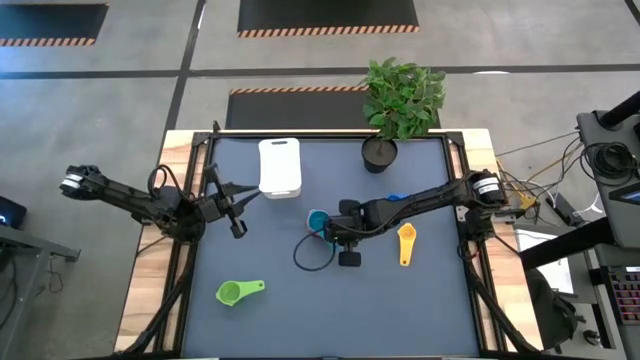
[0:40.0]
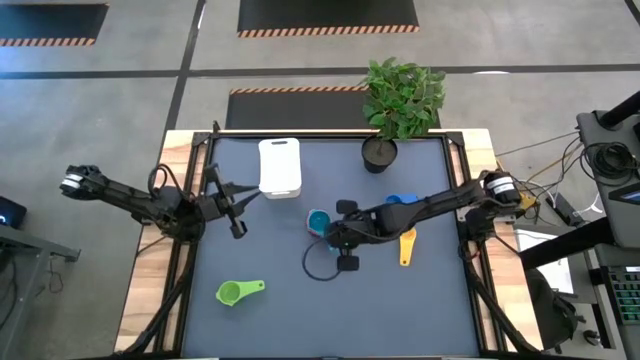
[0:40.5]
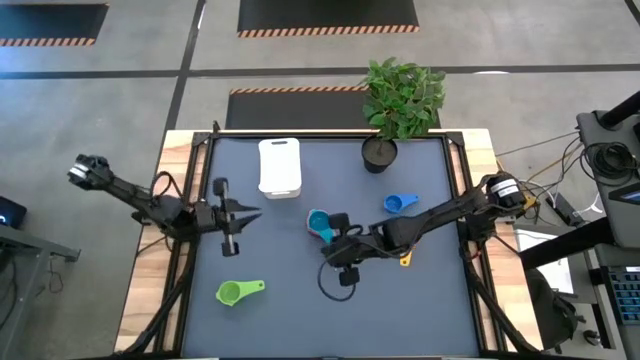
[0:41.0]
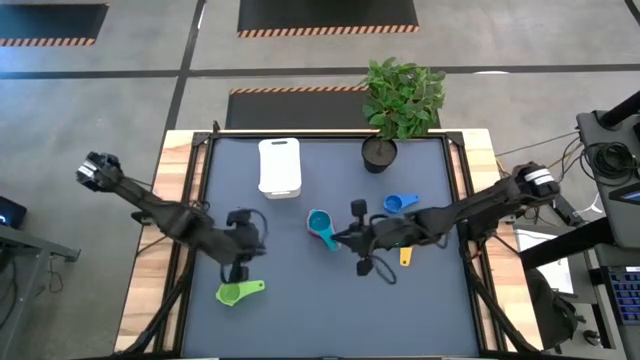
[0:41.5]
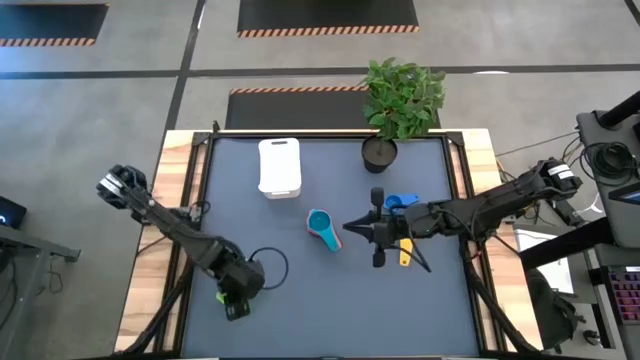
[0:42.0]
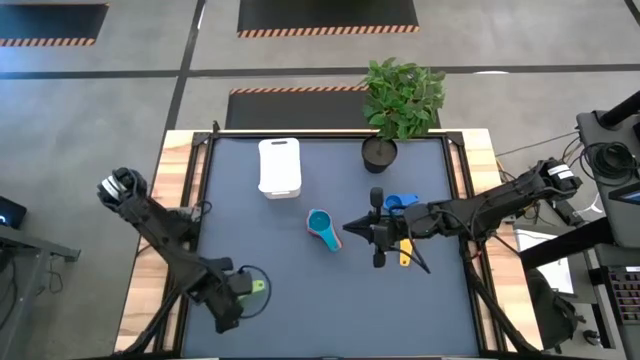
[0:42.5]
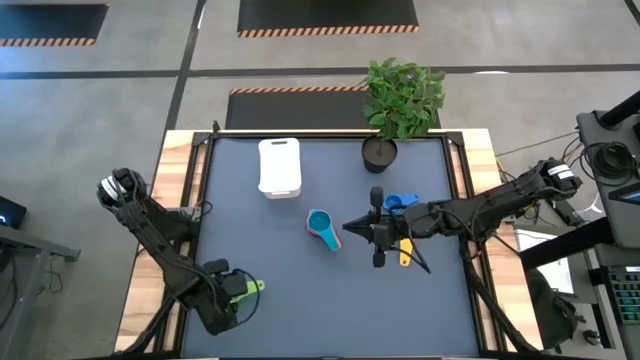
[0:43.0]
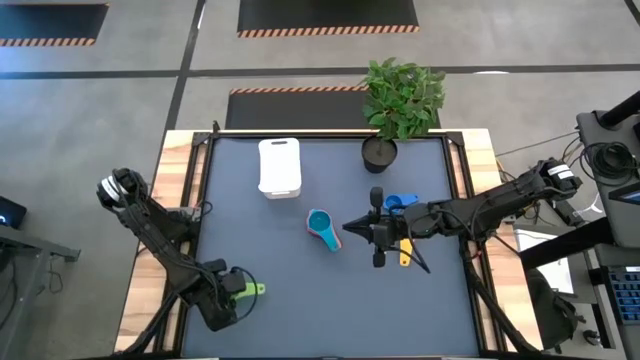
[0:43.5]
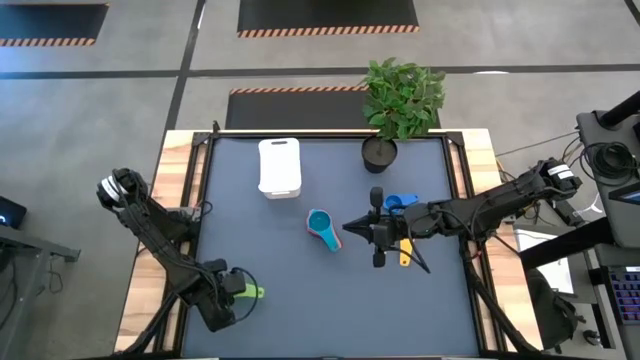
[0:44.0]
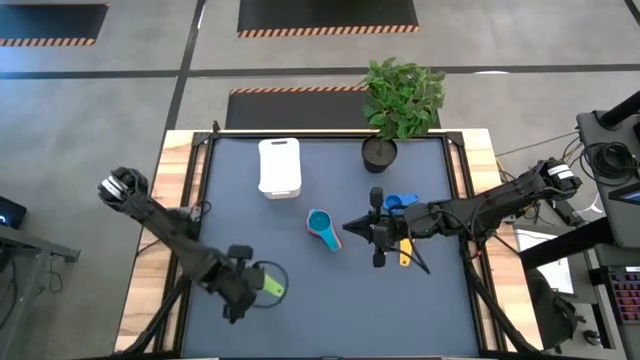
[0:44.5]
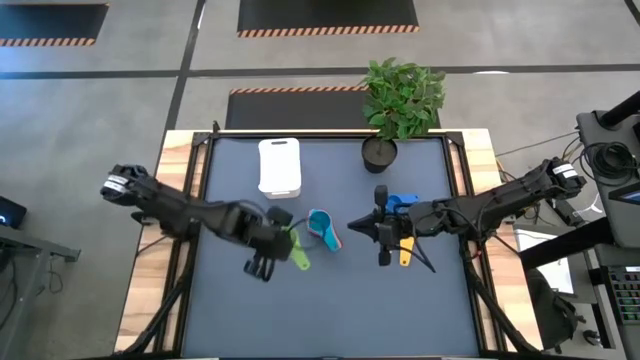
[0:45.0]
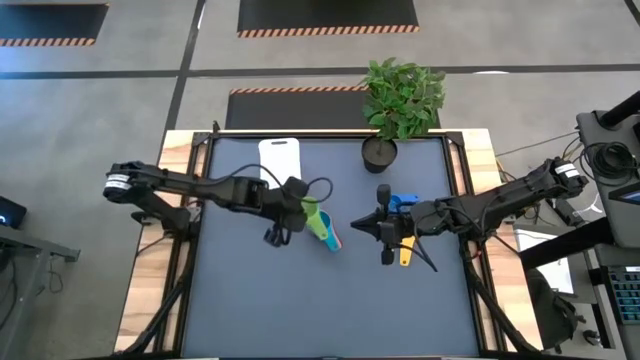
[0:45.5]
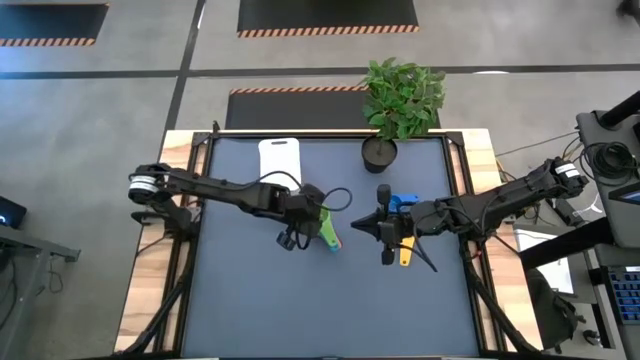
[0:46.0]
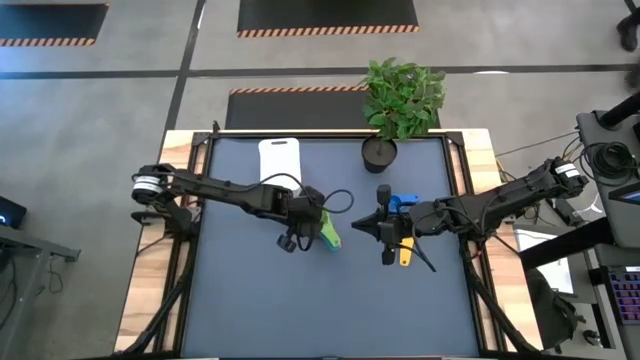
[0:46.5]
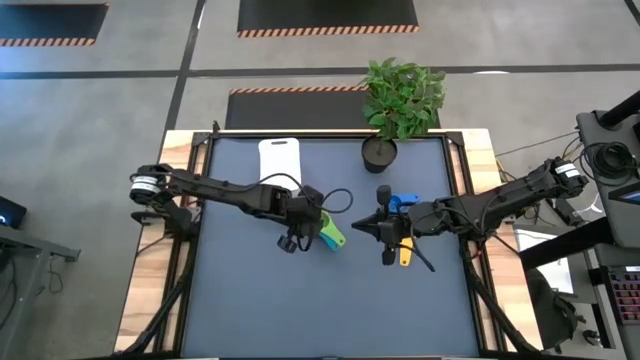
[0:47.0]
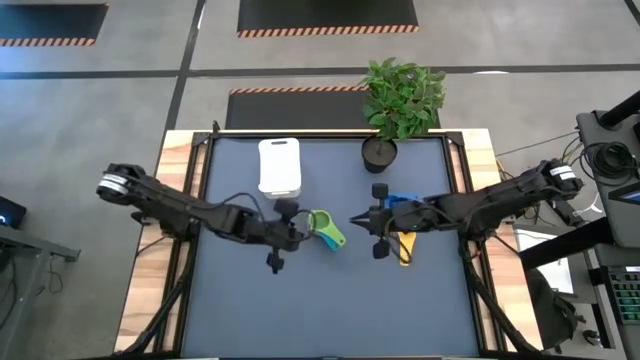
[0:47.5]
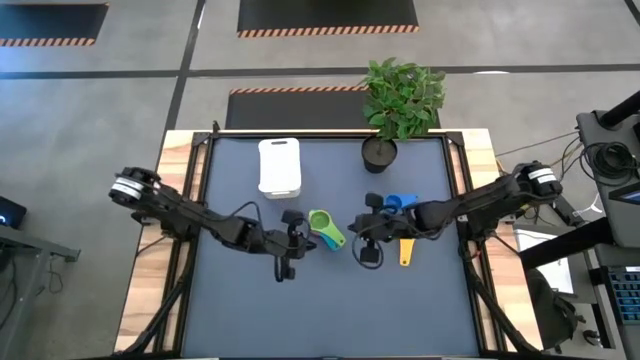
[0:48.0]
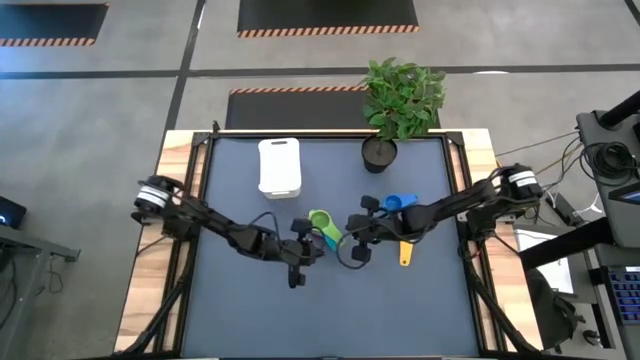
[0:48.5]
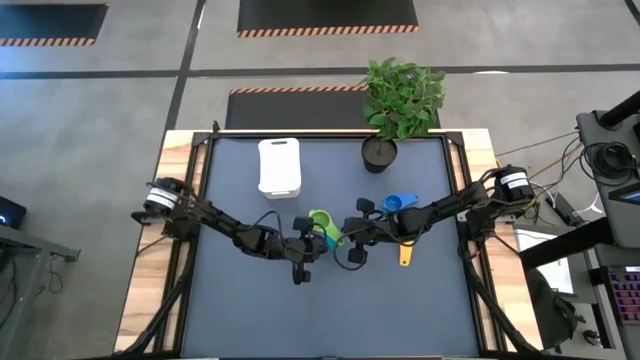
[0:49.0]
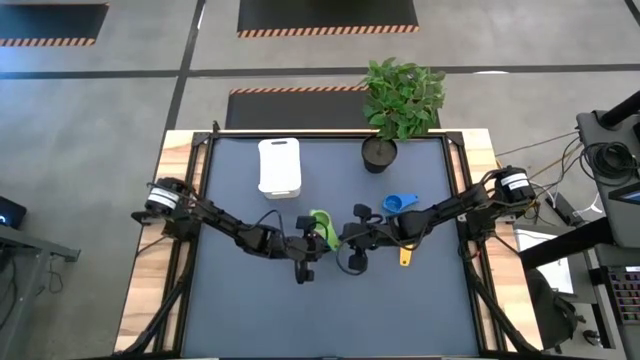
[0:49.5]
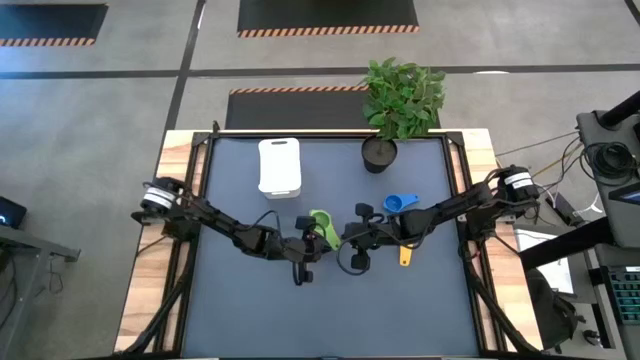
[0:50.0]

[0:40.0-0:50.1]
Task: Nest measuring cups in basket
Stack the green measuring cup on top of the light blue measuring cup

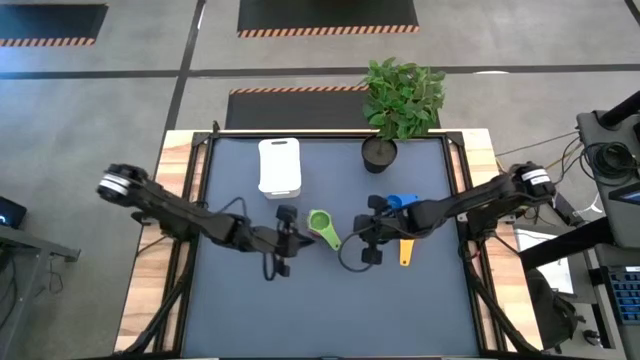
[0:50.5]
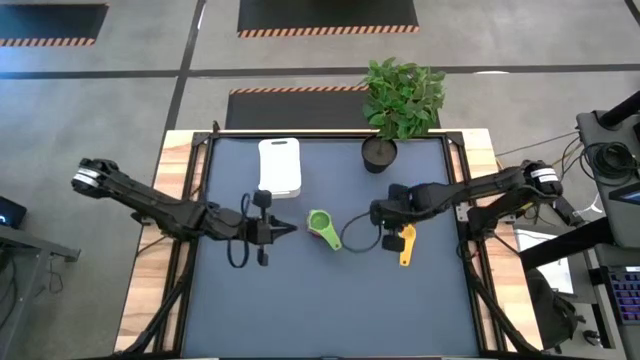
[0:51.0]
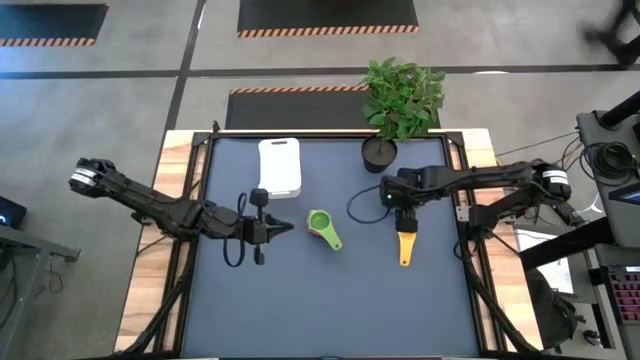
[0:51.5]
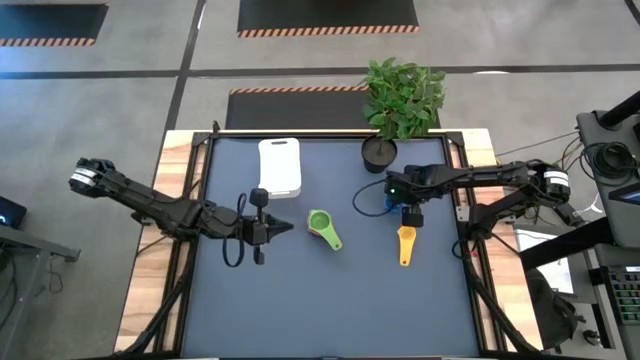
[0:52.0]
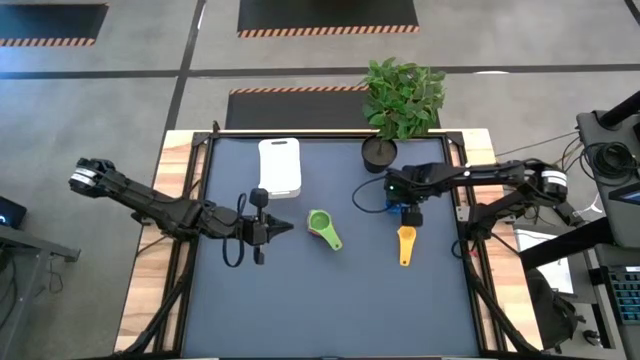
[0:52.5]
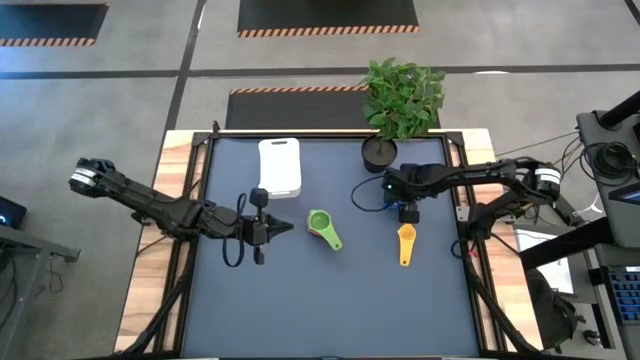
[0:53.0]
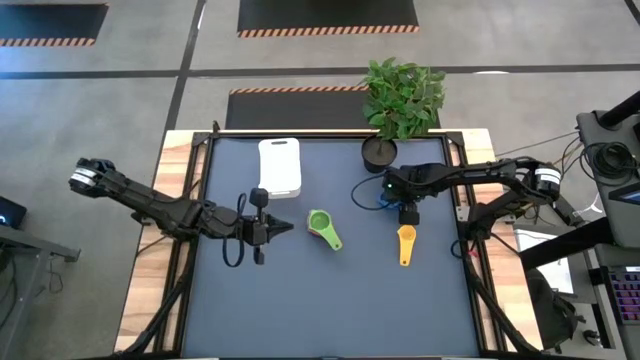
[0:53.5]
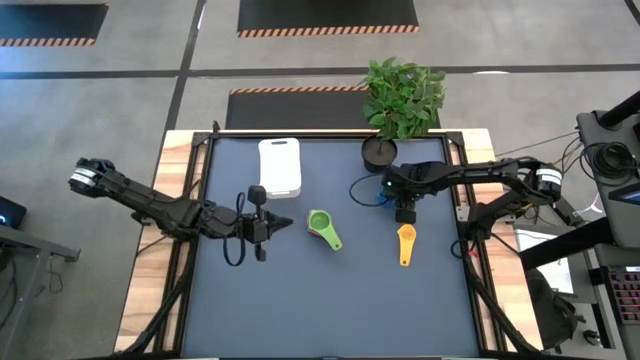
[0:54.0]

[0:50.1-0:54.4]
Stack the blue measuring cup on top of the green measuring cup

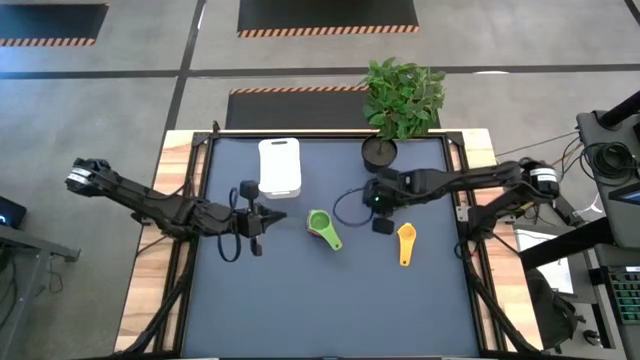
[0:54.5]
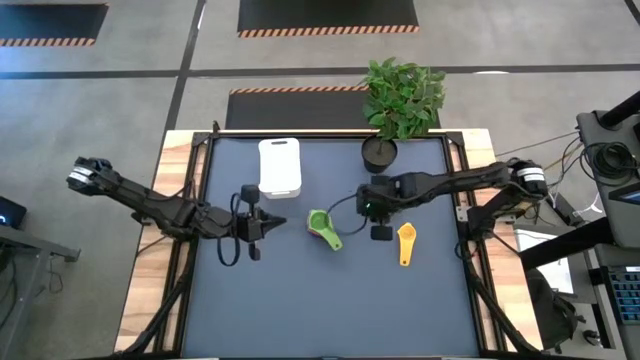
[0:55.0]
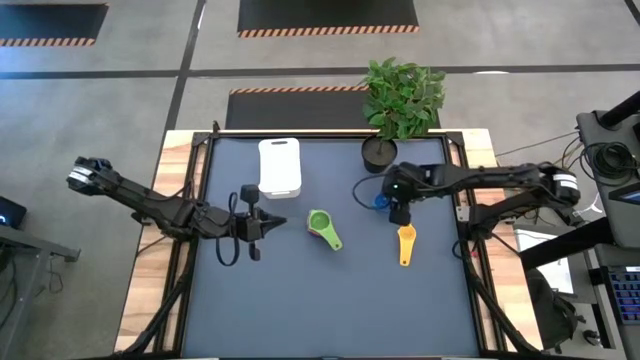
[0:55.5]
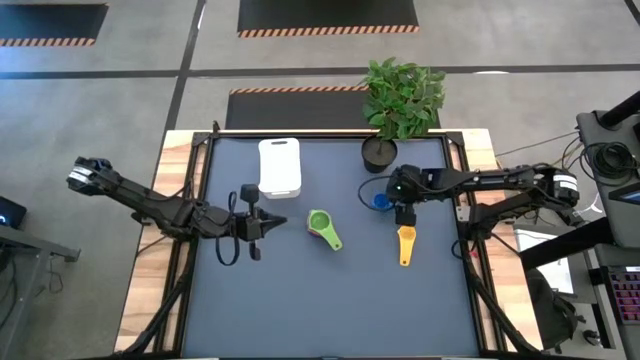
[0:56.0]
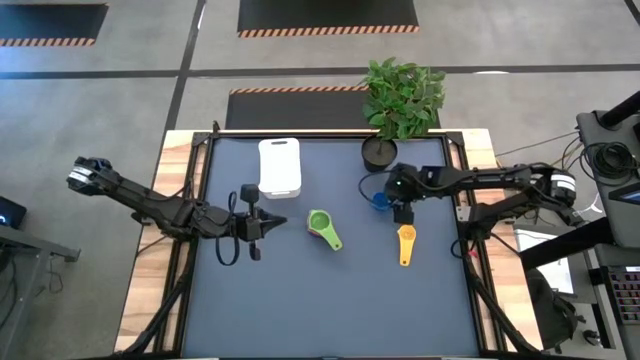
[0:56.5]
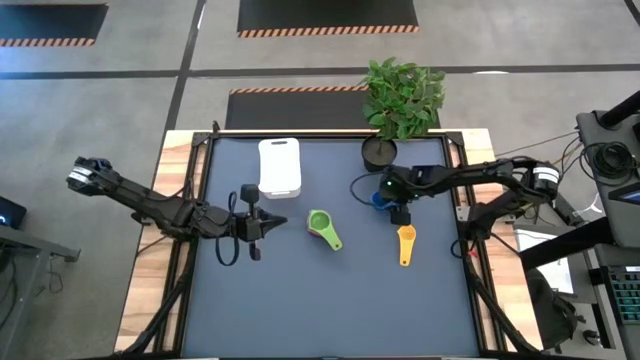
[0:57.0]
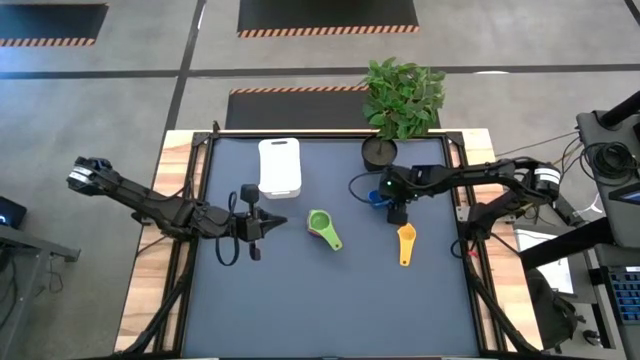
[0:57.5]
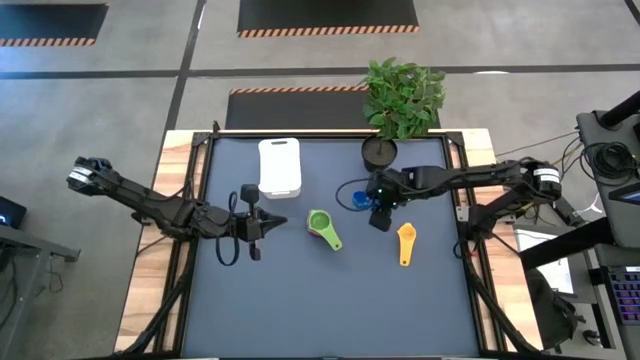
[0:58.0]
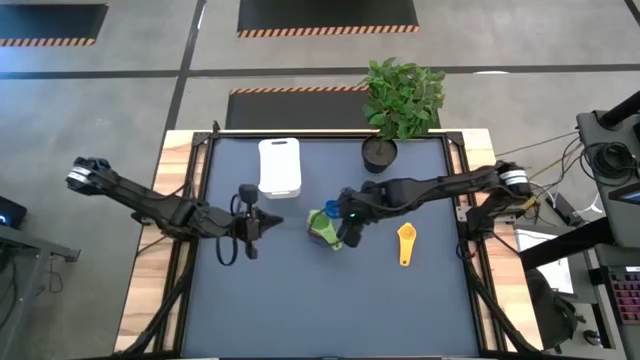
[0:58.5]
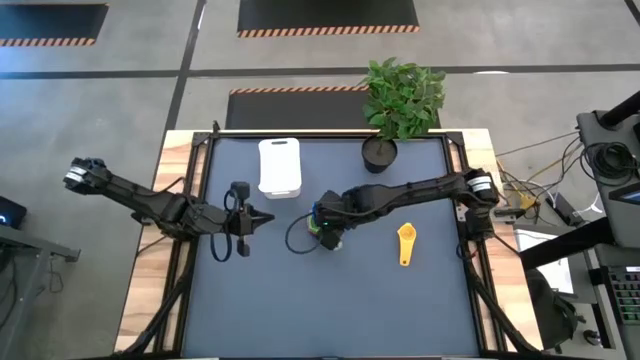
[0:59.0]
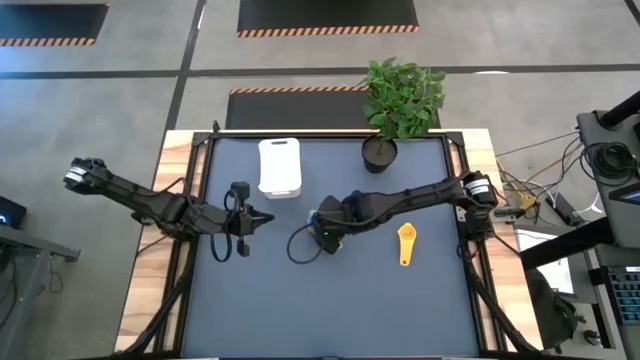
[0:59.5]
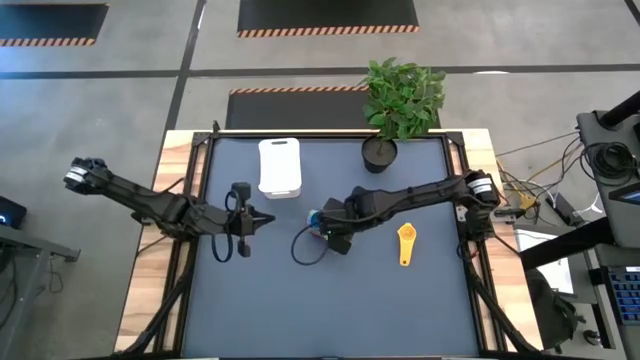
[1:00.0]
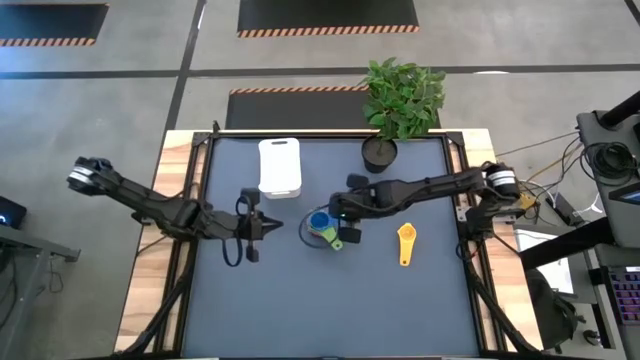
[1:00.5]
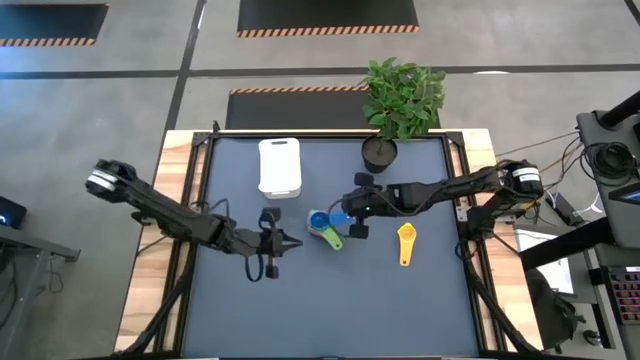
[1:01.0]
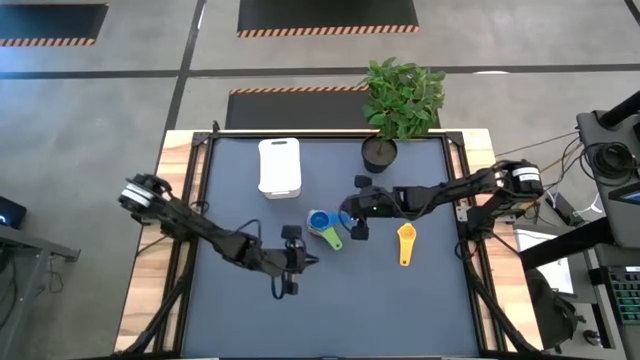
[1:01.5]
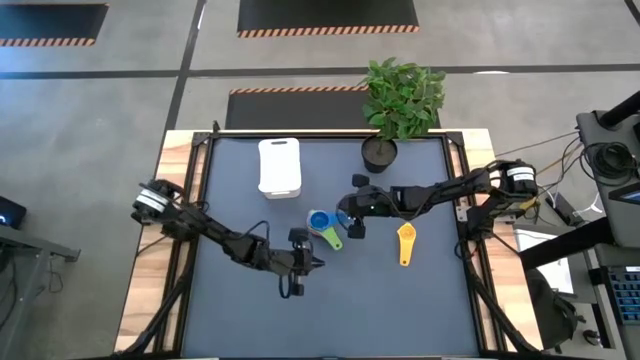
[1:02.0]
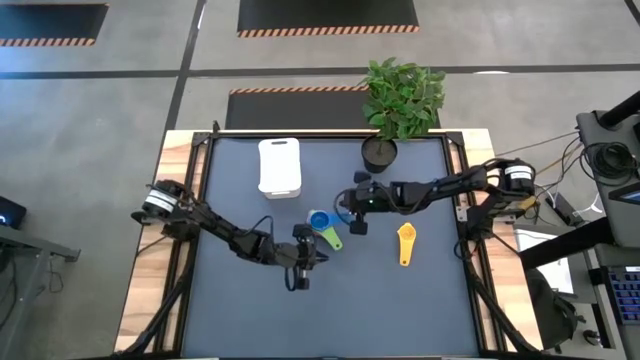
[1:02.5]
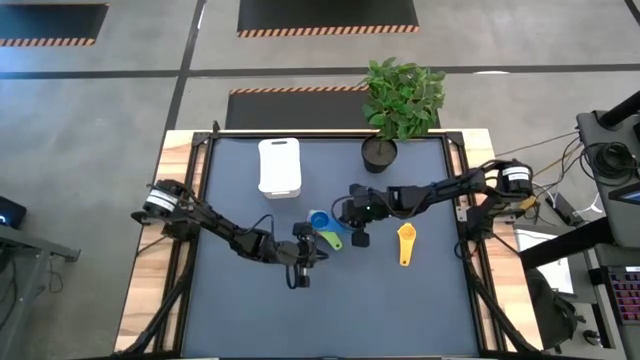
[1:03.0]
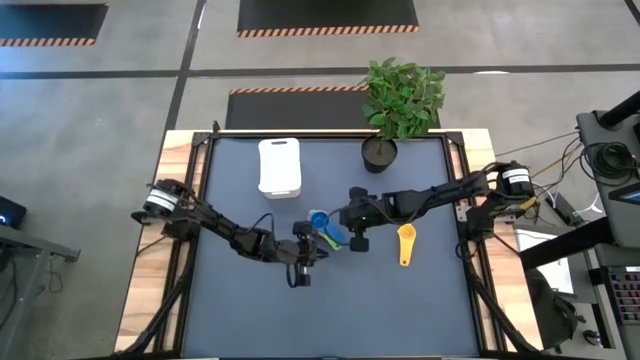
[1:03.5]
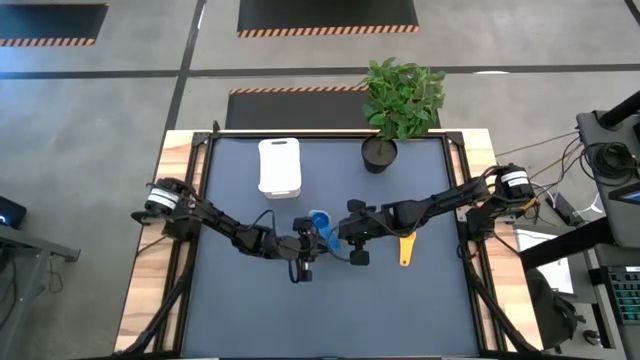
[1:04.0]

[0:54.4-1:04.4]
Stack the blue measuring cup on top of the green measuring cup
